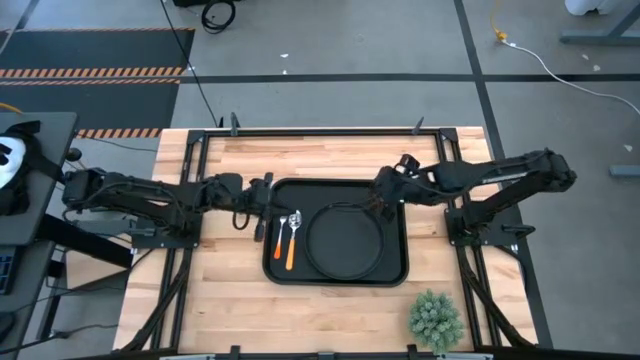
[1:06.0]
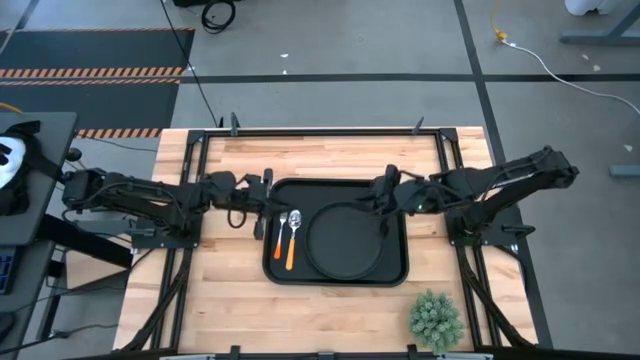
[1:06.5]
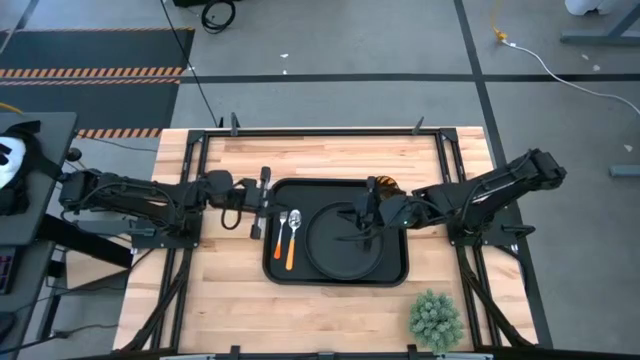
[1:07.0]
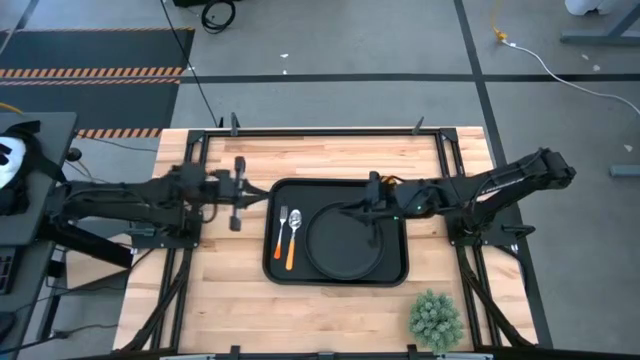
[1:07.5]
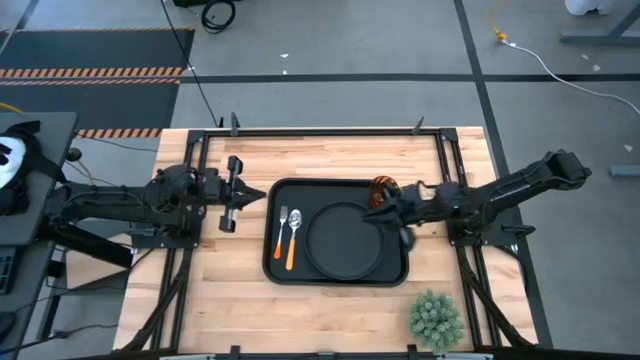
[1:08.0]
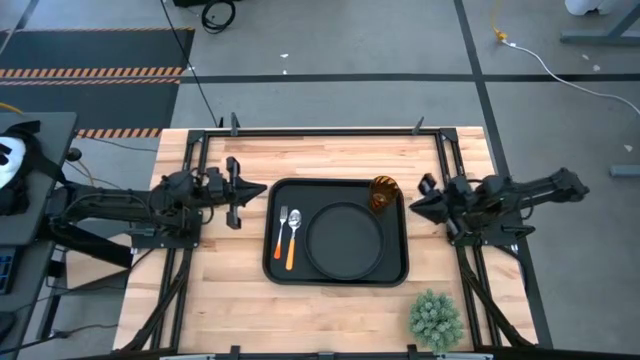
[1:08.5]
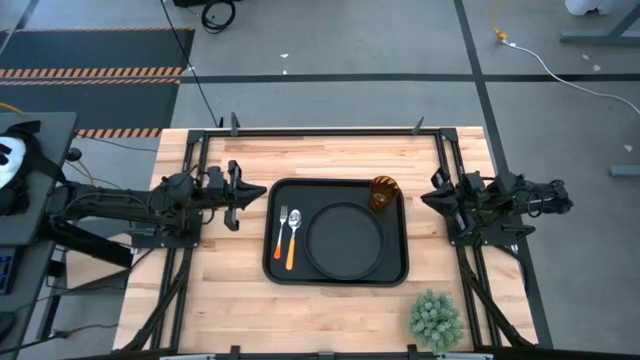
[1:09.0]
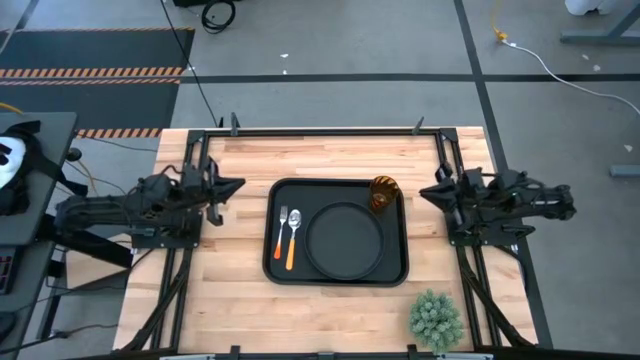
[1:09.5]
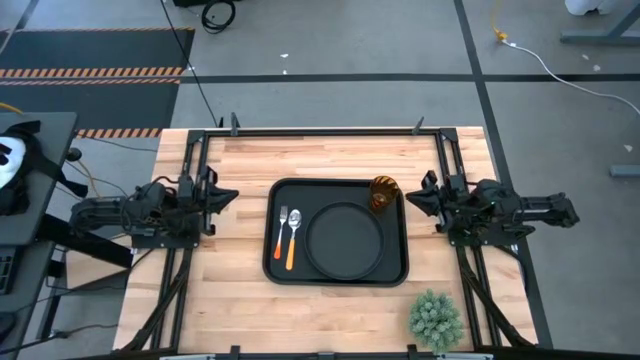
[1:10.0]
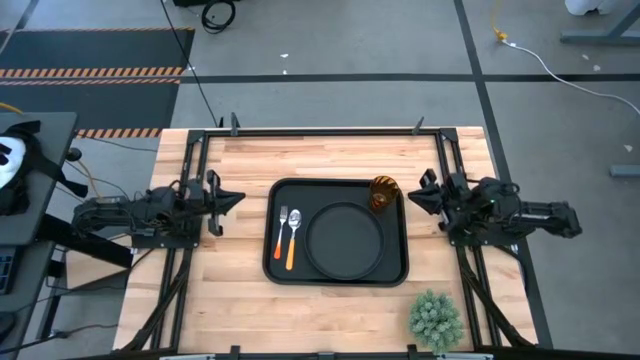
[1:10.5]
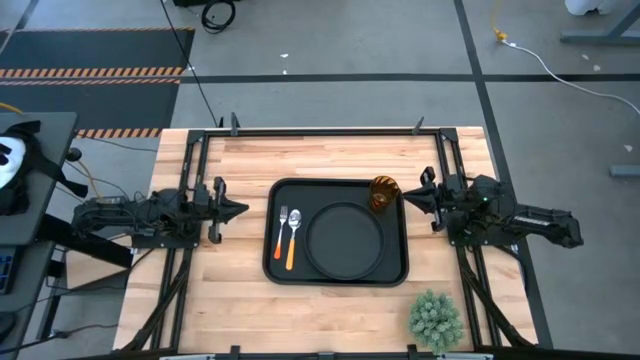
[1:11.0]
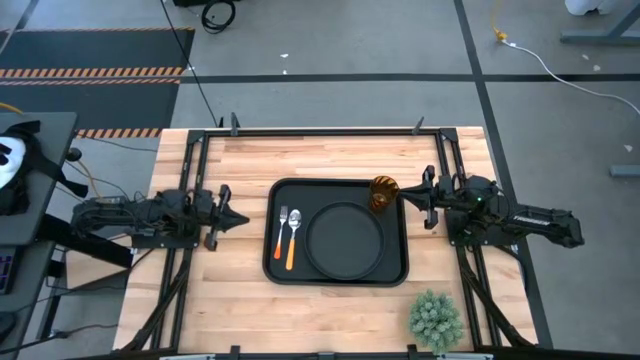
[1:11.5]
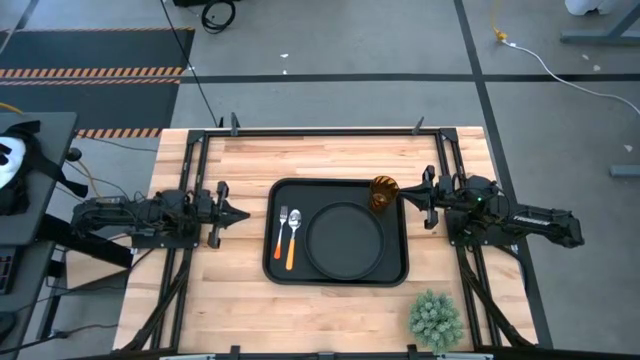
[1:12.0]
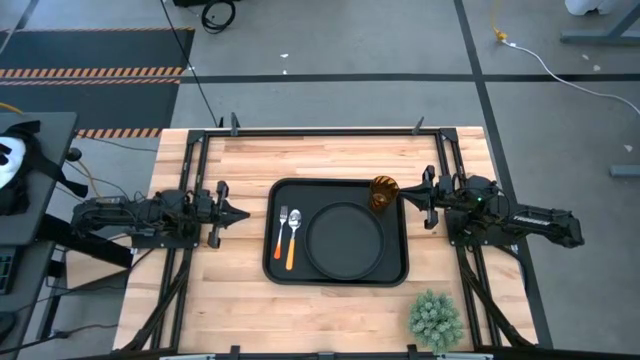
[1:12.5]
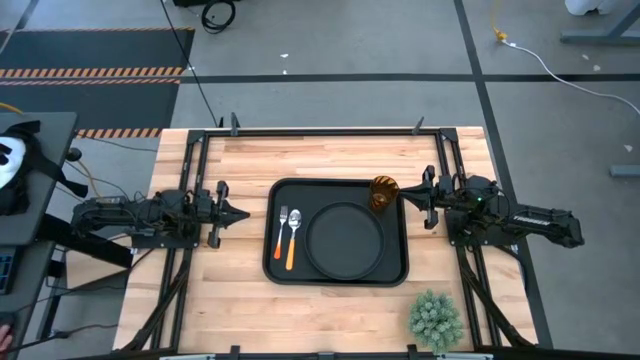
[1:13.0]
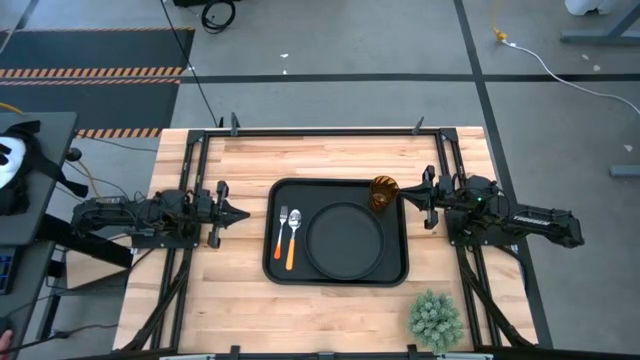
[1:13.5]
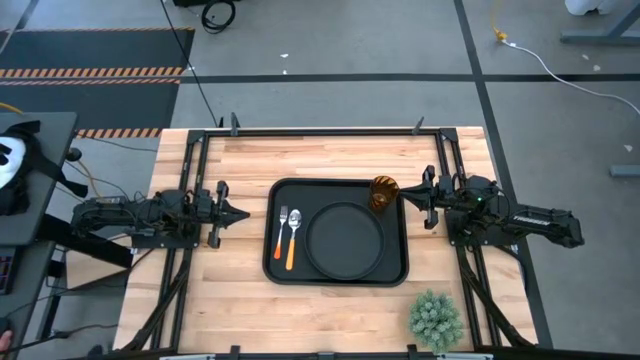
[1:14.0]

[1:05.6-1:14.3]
Task: Pick and place plate/cup/fork/spoon on tray
Return to Home Position

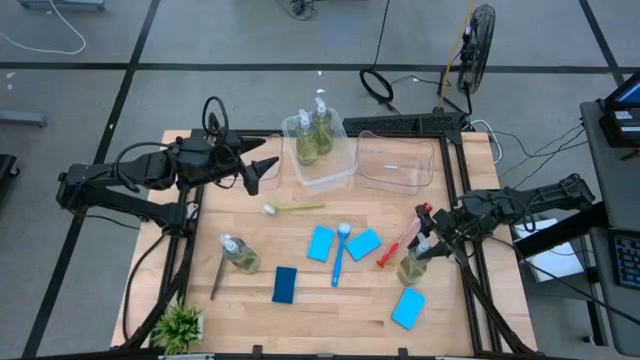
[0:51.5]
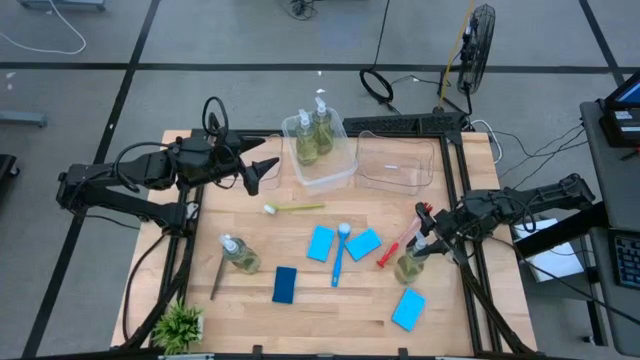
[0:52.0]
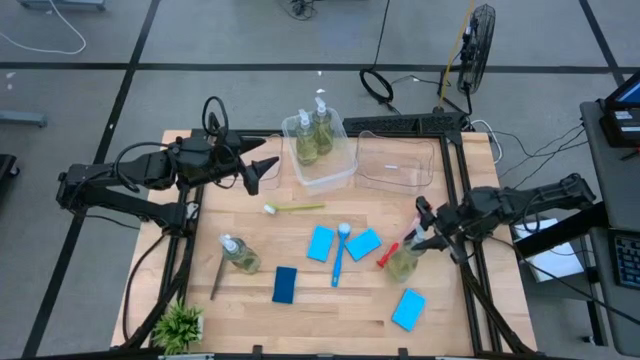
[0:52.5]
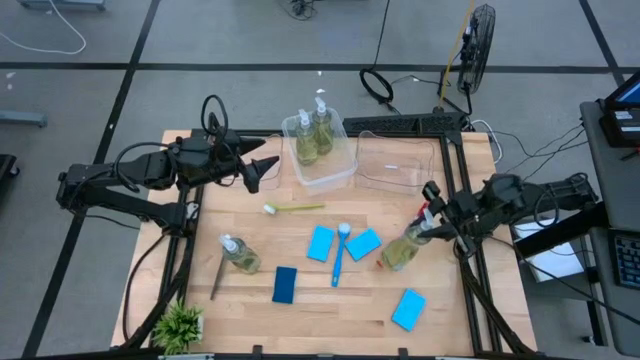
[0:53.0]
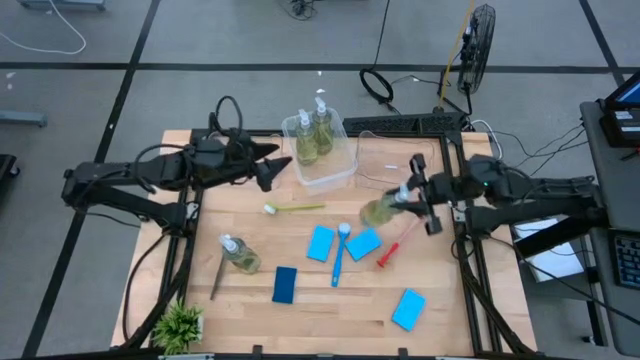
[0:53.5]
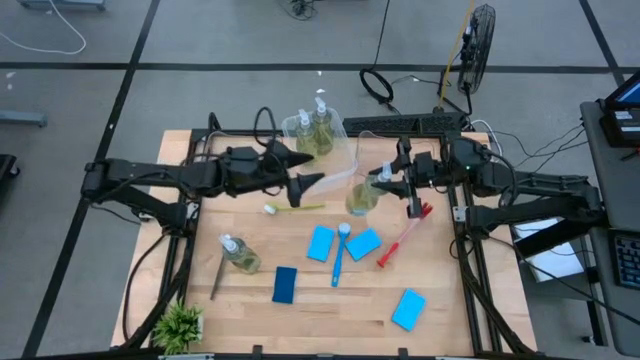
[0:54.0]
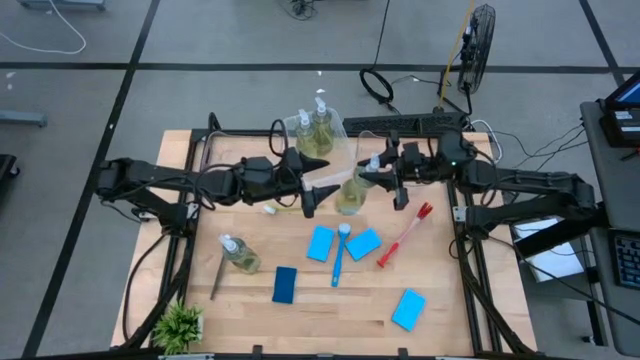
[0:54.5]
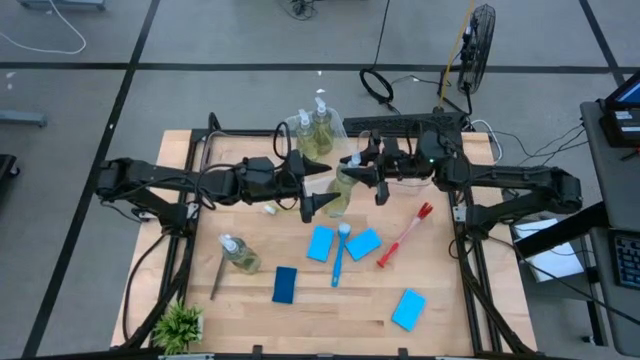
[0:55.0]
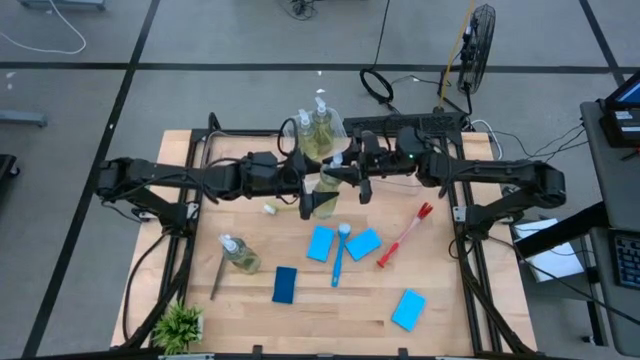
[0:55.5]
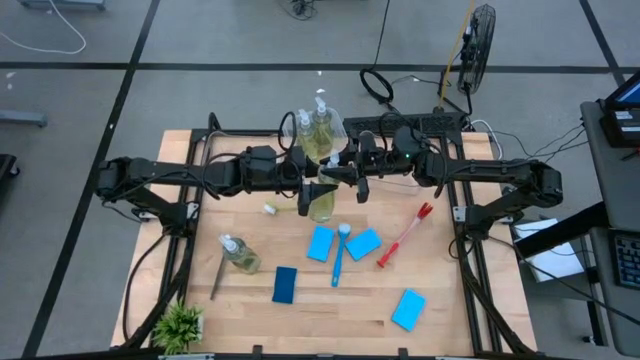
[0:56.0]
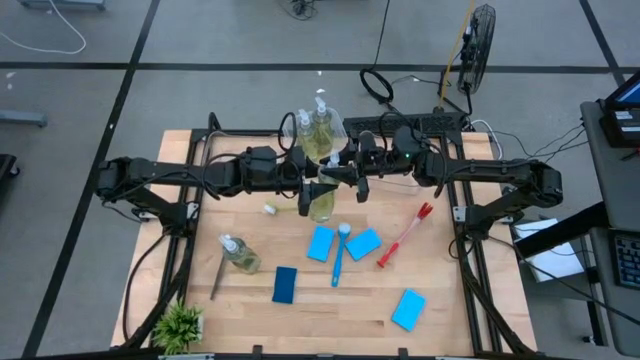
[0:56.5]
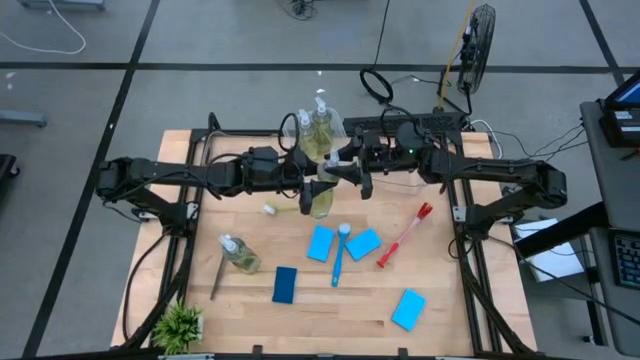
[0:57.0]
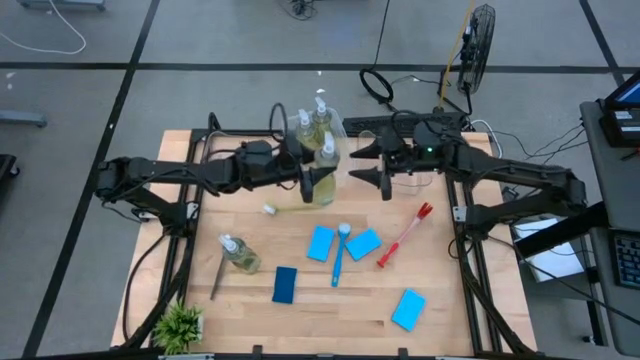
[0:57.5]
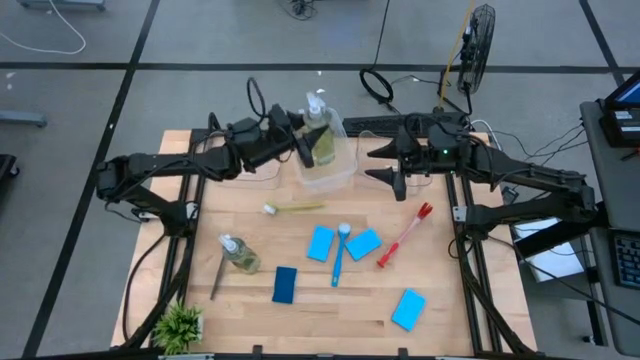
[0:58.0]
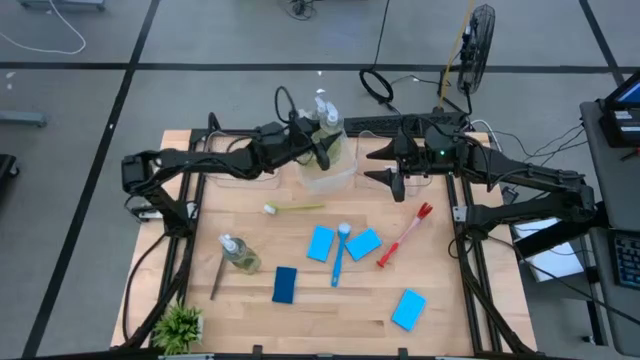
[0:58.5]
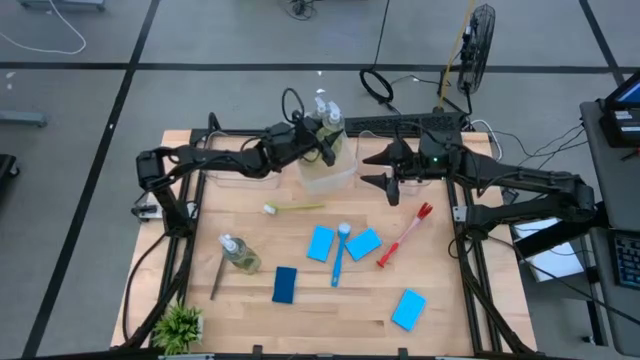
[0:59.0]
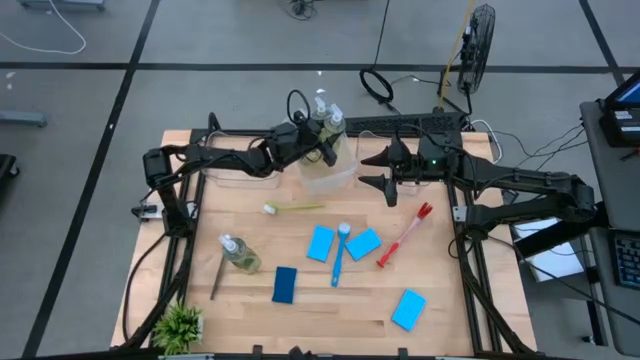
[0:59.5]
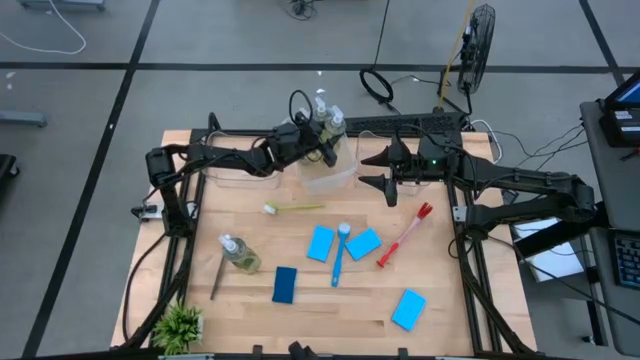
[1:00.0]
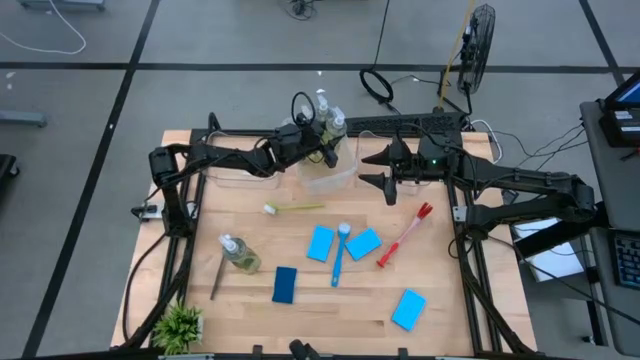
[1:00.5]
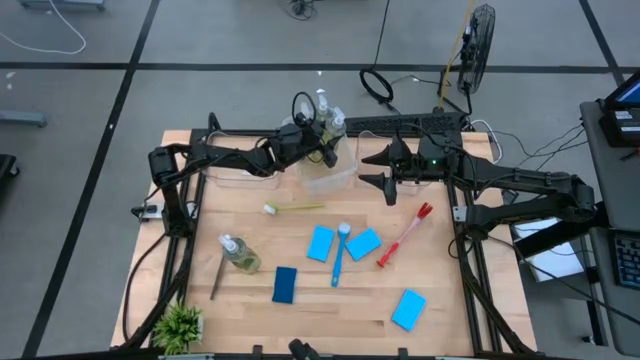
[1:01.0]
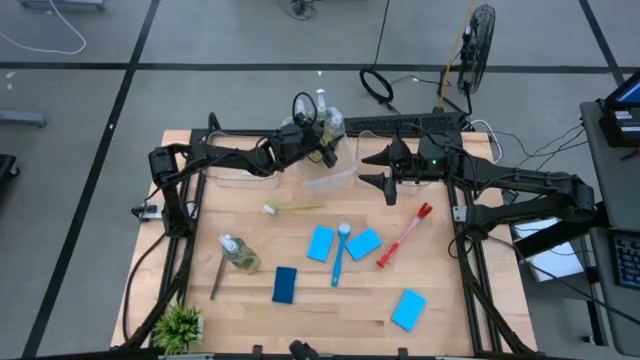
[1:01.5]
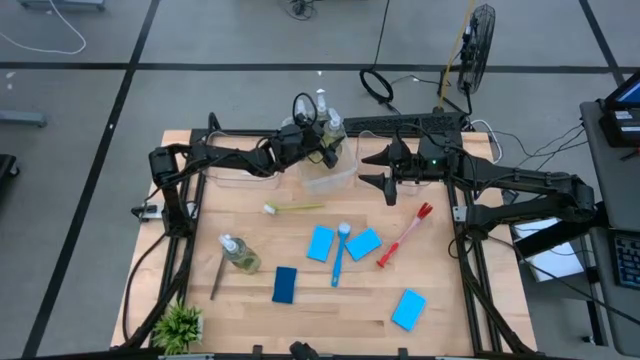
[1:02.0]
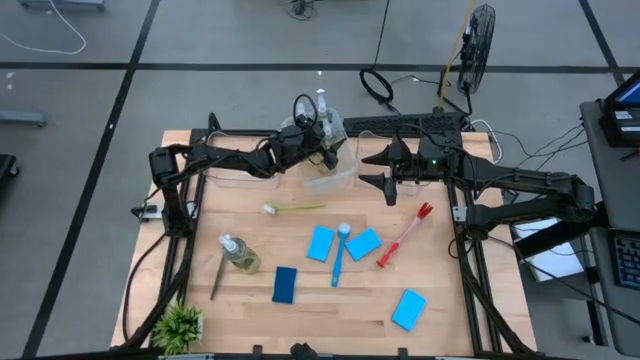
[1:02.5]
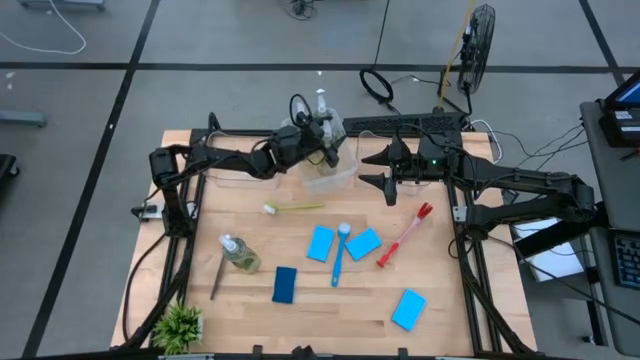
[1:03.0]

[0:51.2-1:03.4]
Task: Pick & Place Kitchen Sink Supplies
Put the yellow dish soap into the white bin
